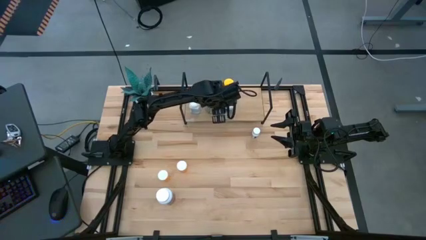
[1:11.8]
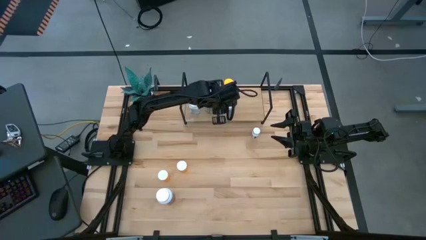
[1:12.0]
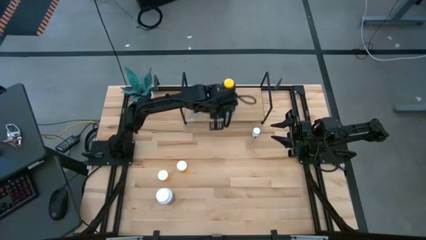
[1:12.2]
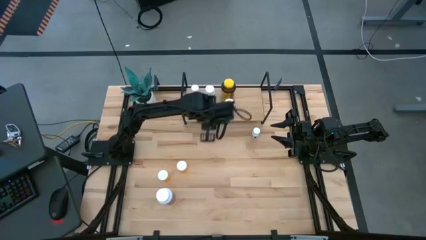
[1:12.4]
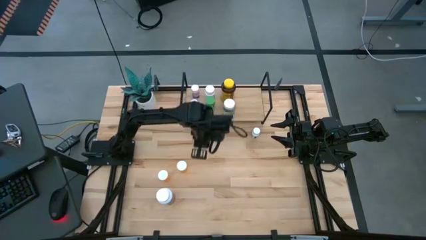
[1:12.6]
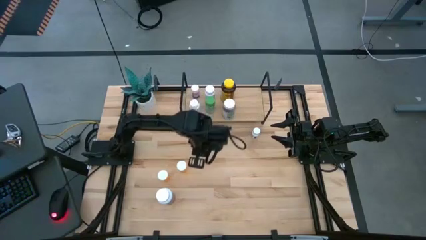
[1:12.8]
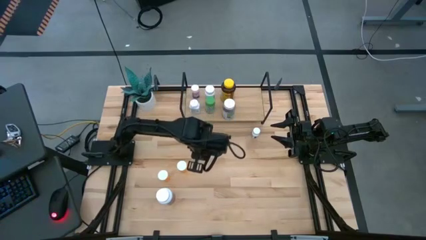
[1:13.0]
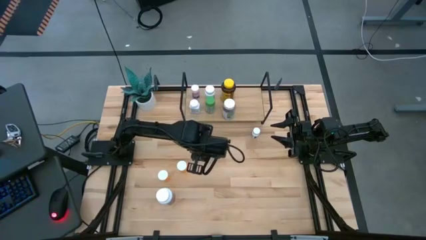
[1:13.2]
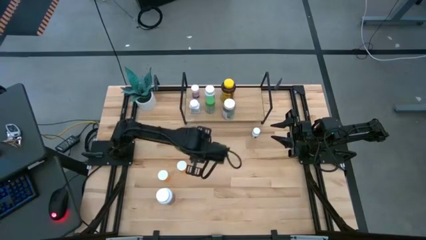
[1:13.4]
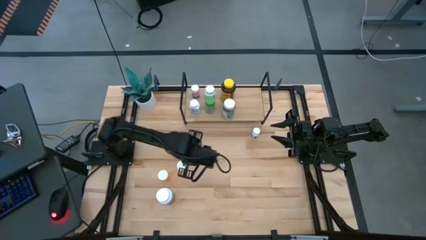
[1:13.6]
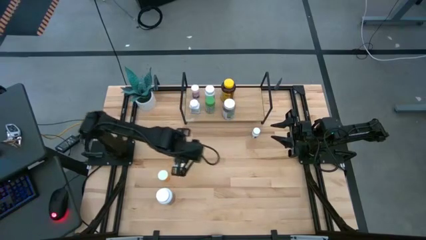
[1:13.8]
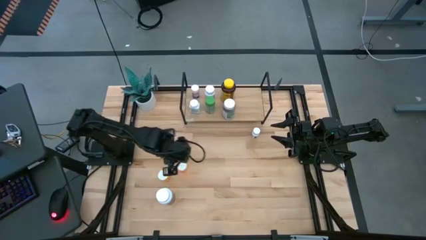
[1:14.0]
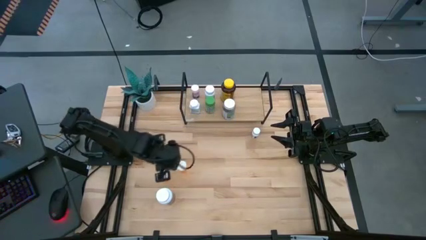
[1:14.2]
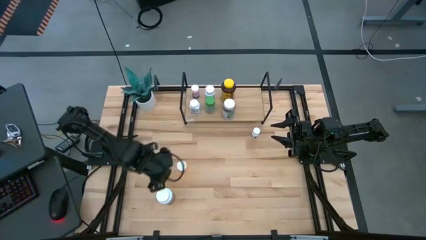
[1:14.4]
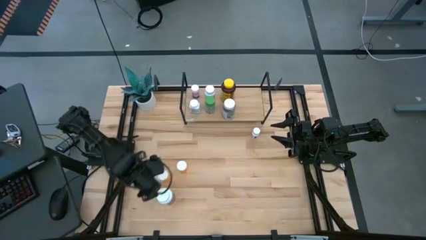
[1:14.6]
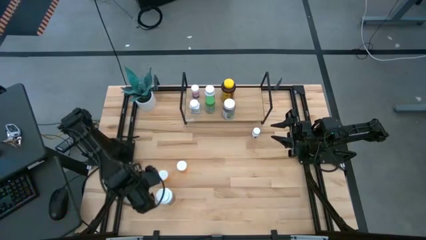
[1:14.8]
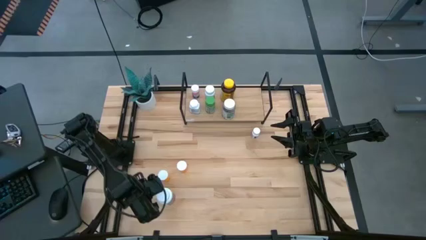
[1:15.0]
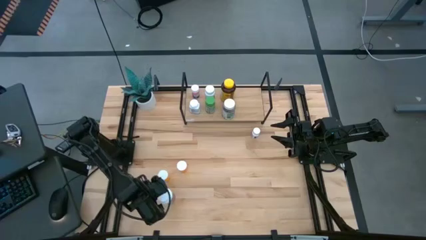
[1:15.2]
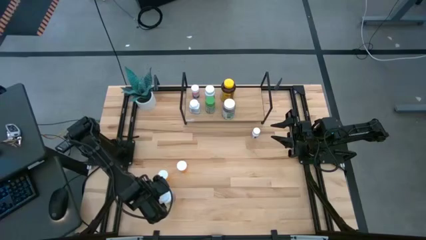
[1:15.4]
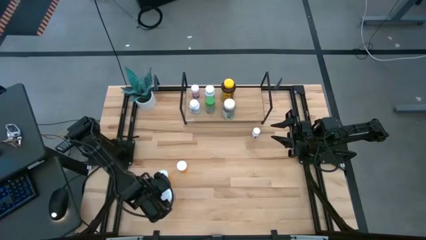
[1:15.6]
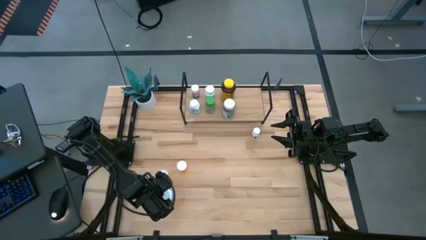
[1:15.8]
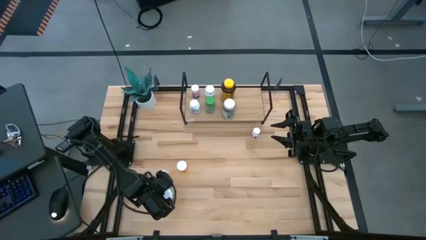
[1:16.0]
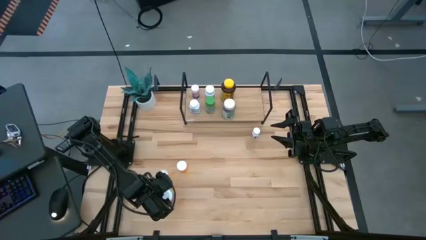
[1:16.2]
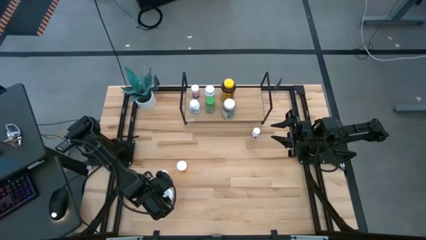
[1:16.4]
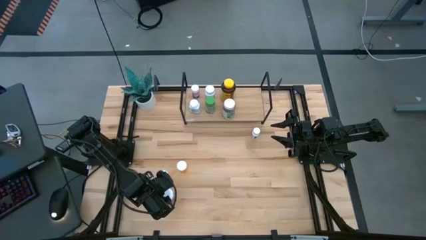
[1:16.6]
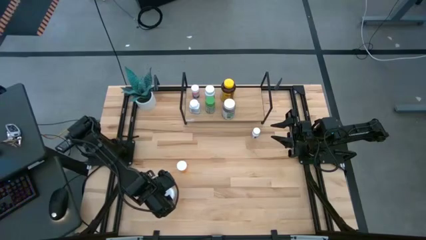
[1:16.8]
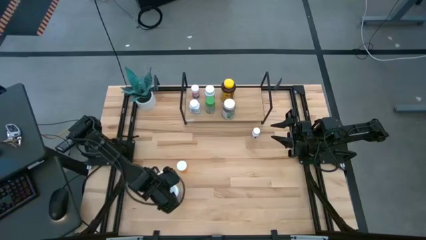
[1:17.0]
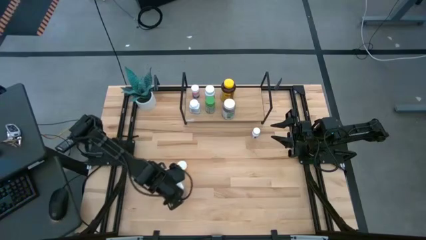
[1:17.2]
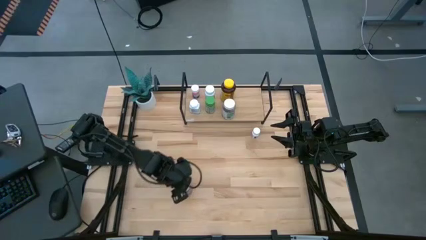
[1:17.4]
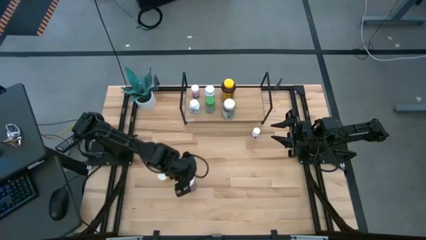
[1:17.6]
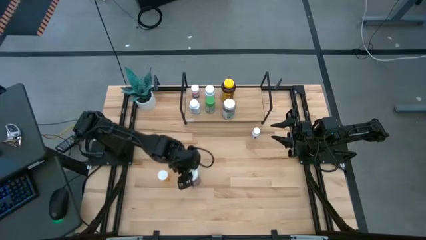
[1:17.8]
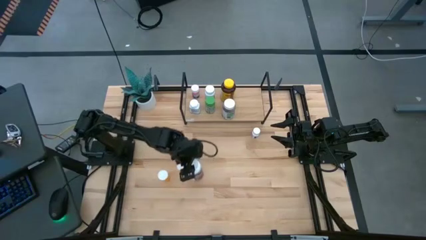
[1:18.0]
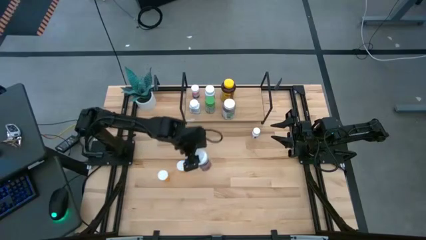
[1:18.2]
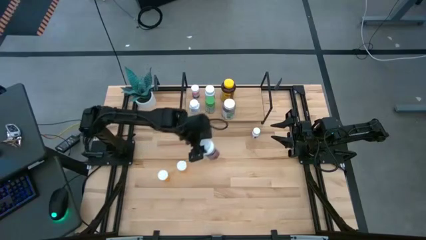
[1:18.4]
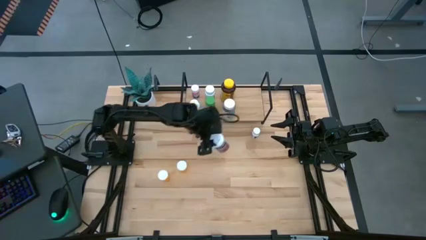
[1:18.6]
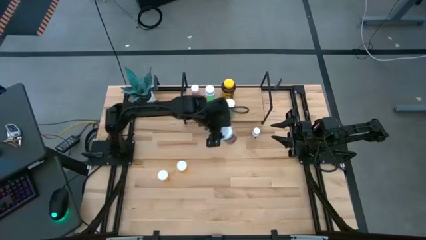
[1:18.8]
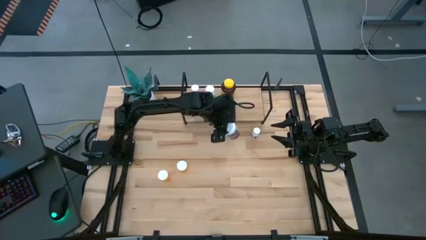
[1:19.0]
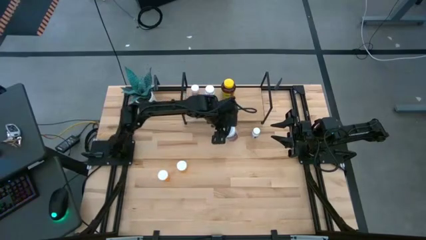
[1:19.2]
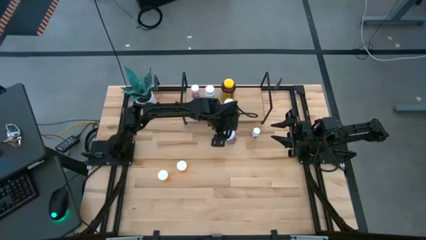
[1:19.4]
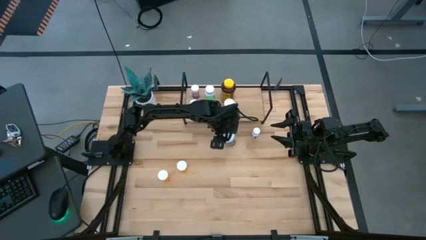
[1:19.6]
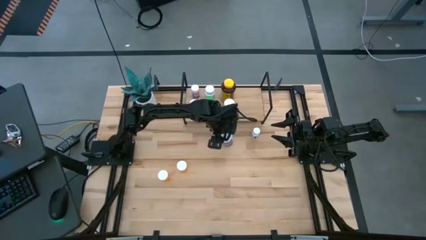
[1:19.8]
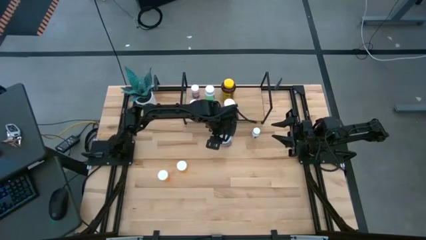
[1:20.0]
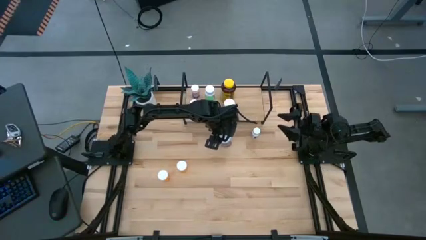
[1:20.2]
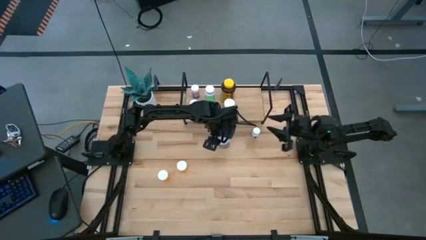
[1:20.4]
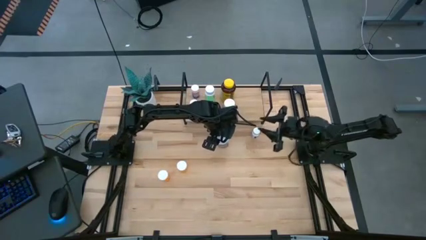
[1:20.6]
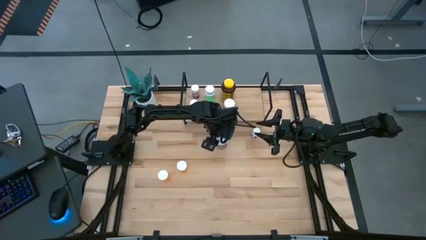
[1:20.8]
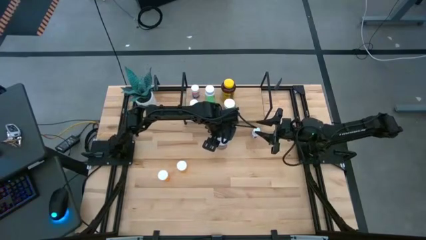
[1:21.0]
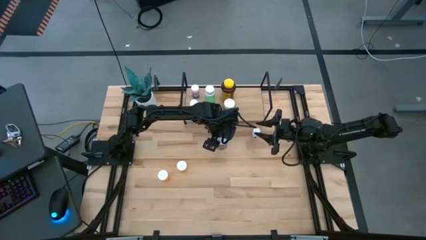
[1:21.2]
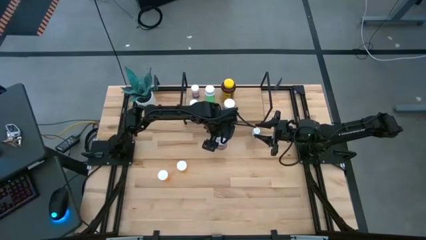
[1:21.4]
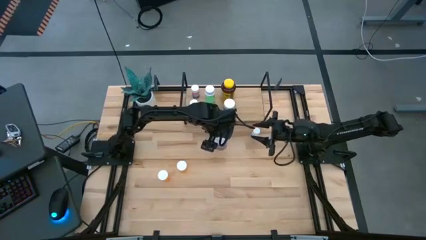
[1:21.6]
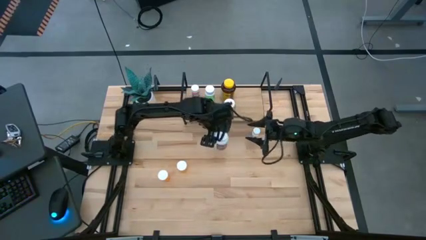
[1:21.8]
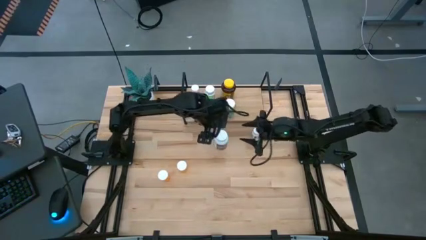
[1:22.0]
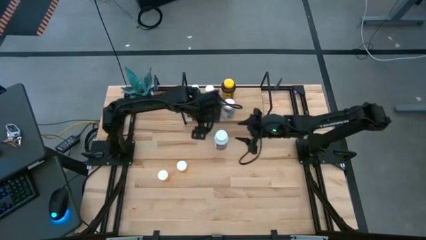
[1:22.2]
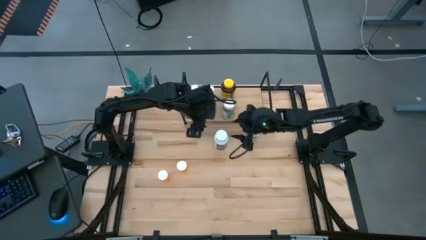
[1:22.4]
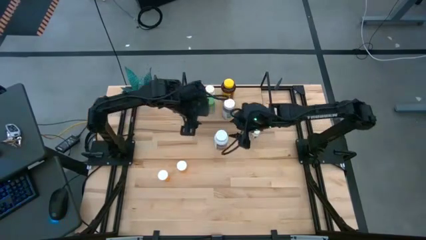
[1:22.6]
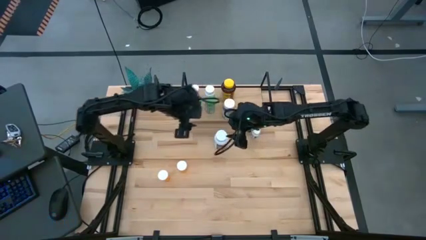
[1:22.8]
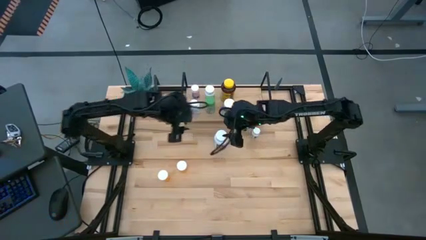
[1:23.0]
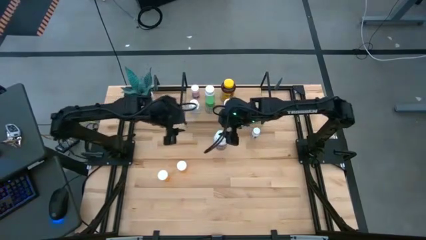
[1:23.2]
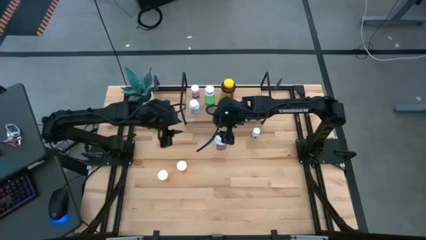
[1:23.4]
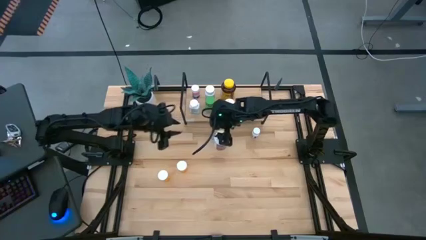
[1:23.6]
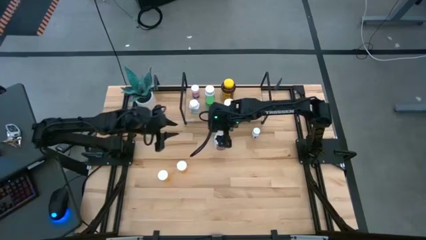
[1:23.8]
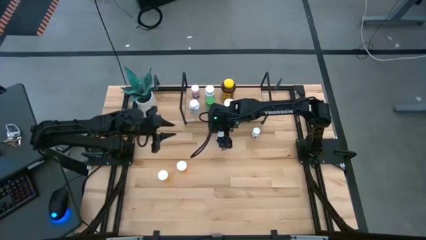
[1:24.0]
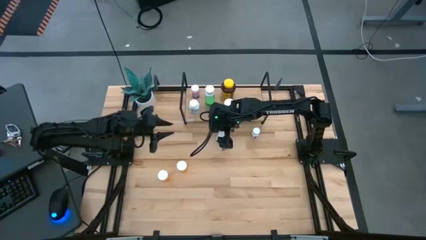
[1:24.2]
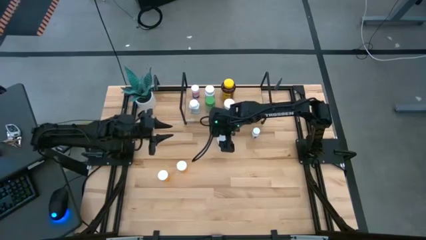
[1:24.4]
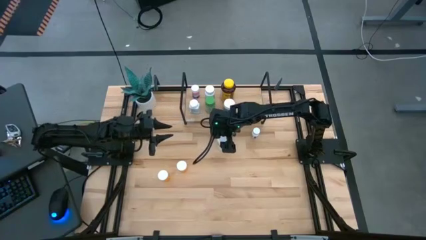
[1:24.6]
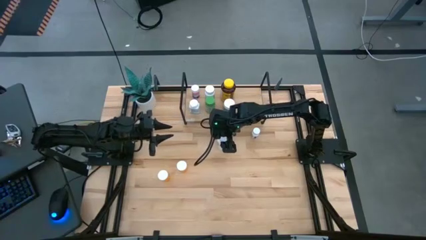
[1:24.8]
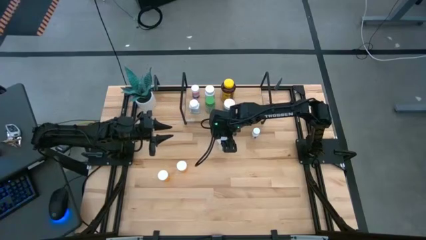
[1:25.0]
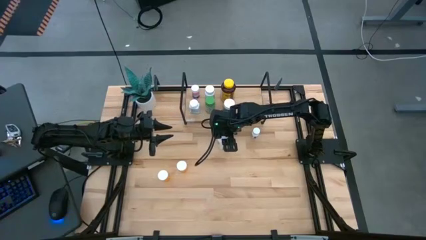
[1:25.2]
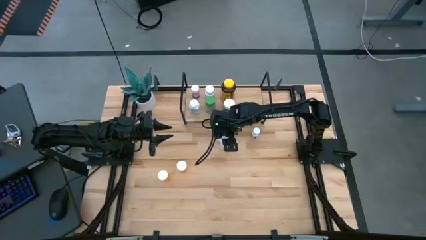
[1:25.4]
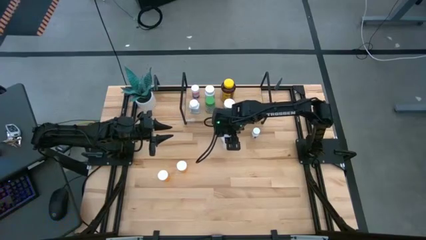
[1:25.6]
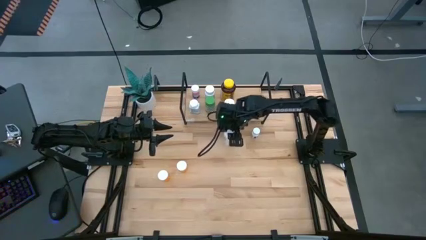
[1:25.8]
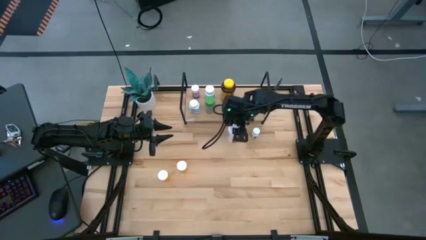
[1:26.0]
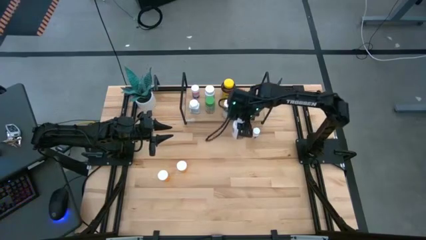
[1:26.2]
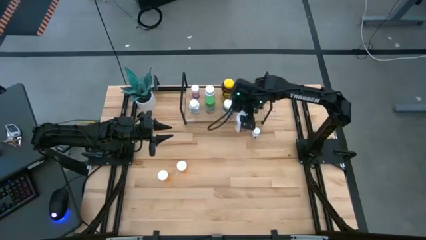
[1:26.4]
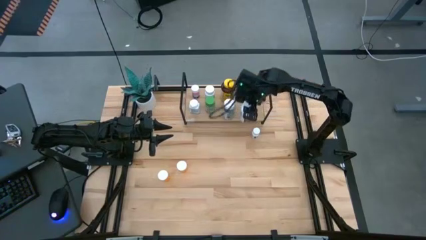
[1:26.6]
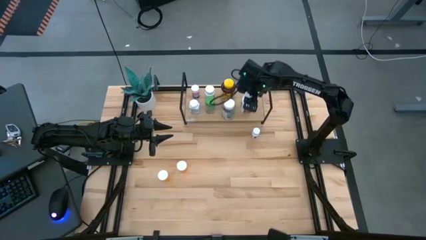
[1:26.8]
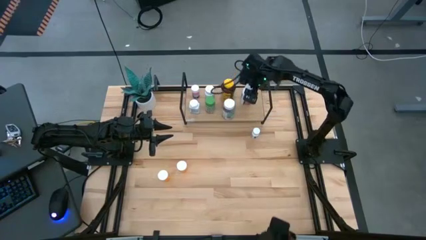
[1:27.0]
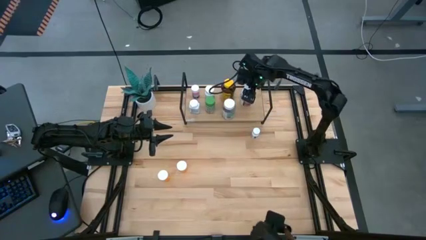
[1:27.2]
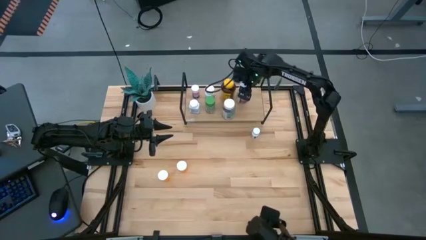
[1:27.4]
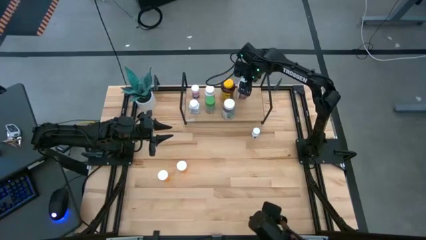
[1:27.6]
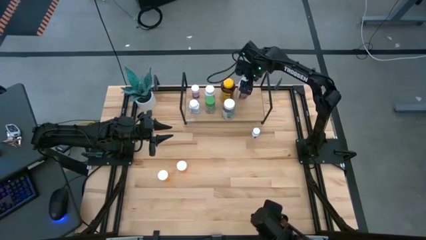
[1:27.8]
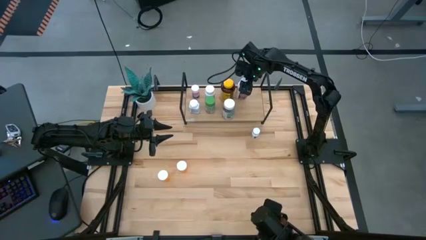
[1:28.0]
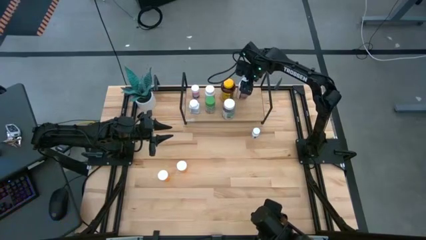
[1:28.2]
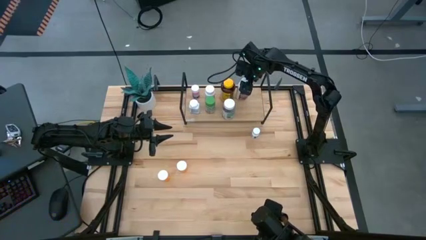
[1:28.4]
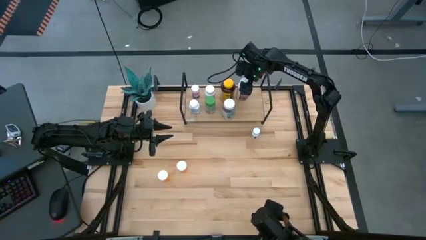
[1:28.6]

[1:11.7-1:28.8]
Task: Pick and place medicine bottles onto shelf by color
Put the large white pill bottle on the shelf
